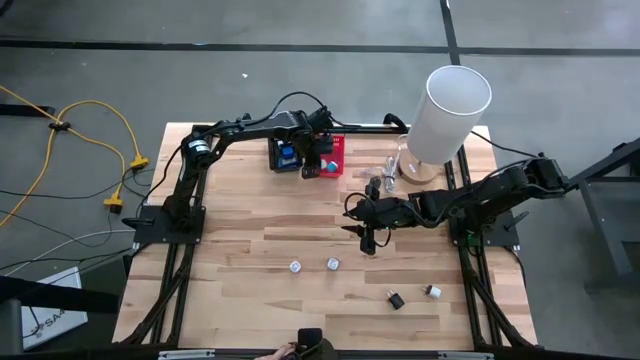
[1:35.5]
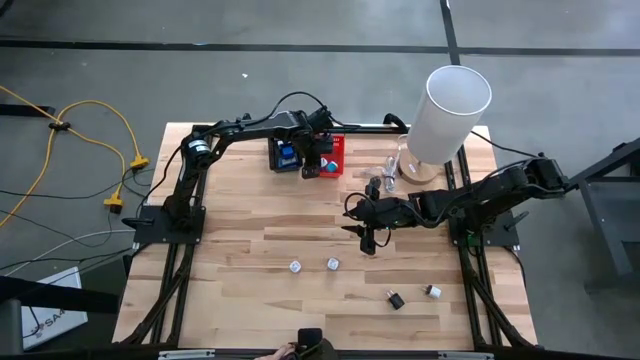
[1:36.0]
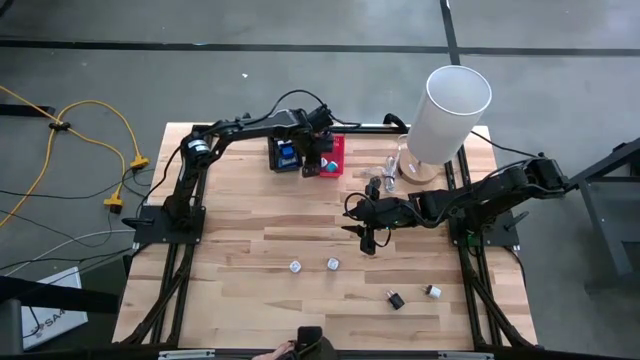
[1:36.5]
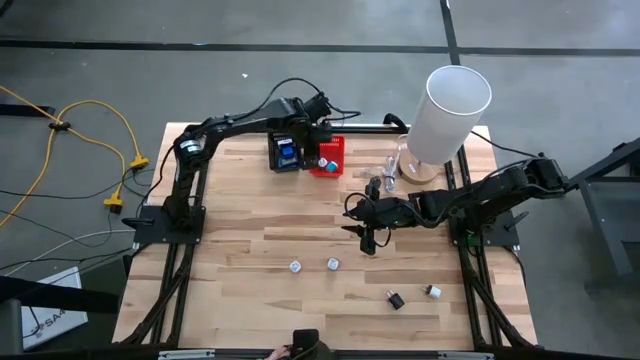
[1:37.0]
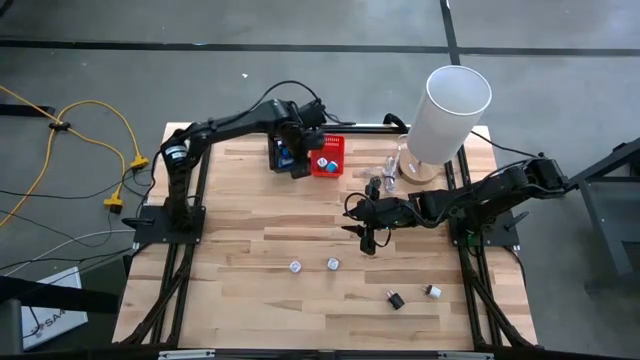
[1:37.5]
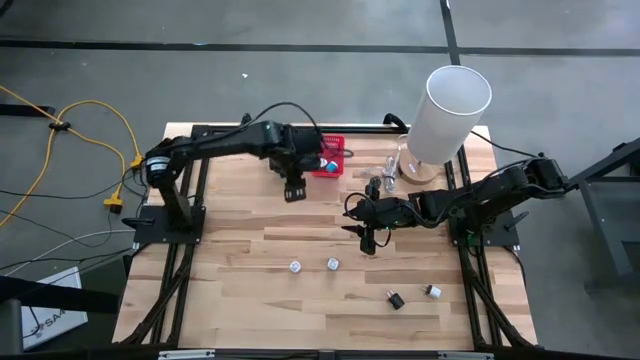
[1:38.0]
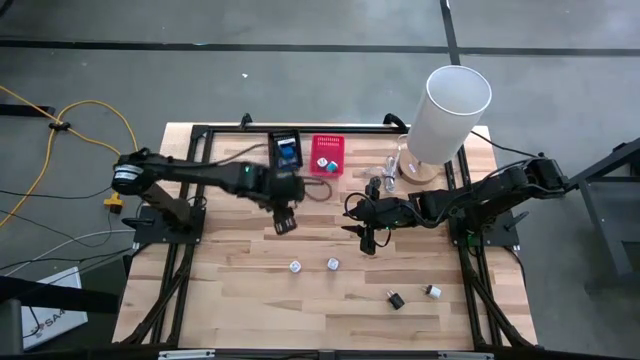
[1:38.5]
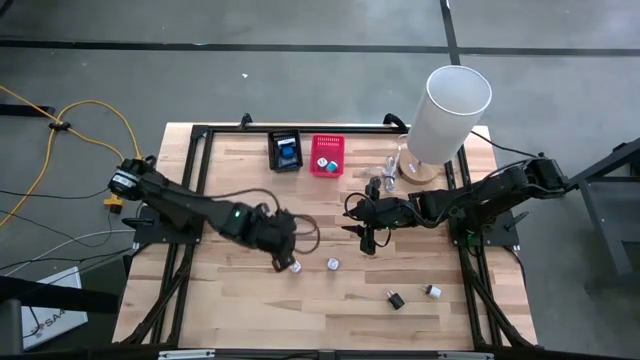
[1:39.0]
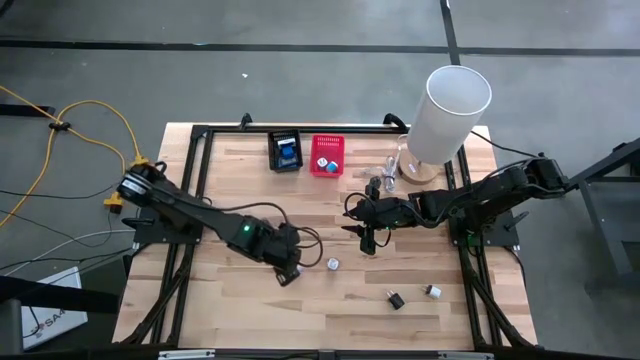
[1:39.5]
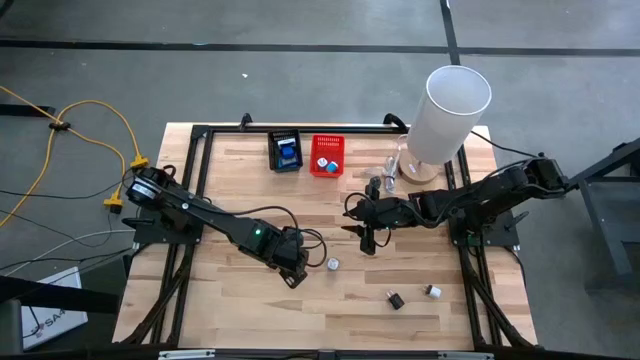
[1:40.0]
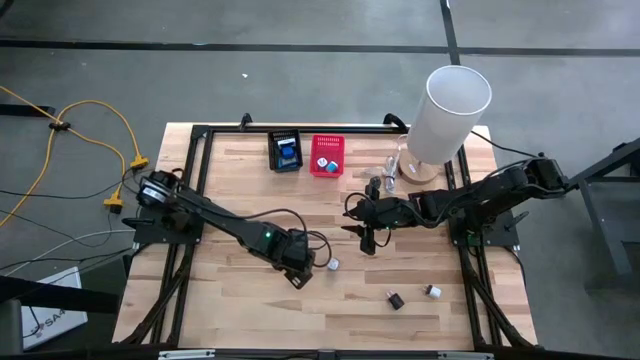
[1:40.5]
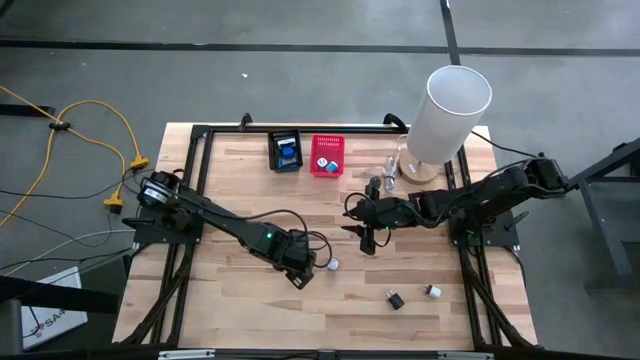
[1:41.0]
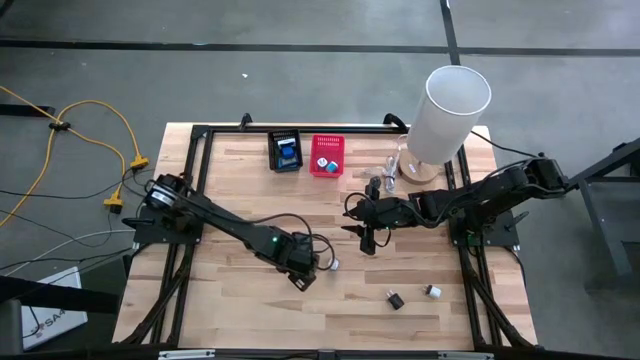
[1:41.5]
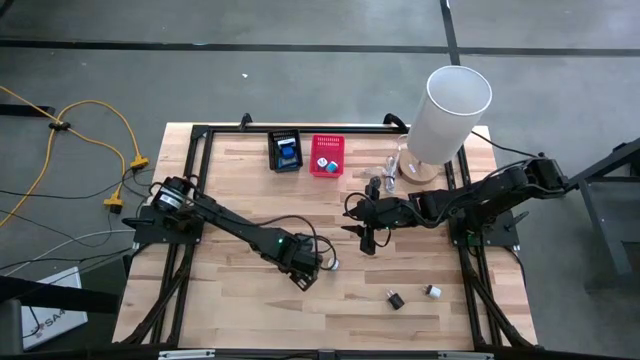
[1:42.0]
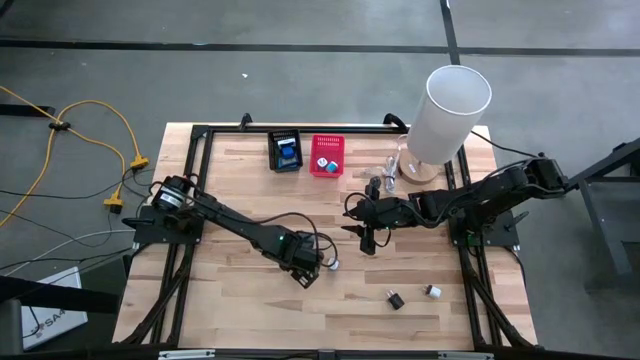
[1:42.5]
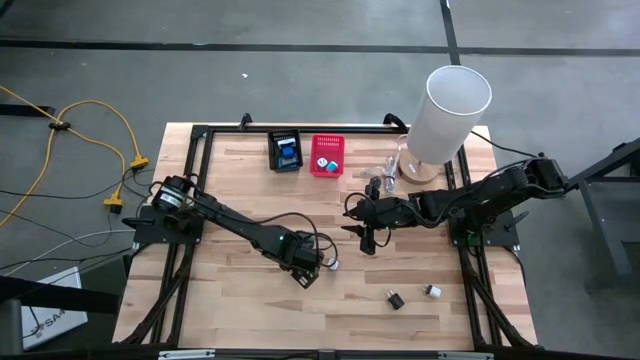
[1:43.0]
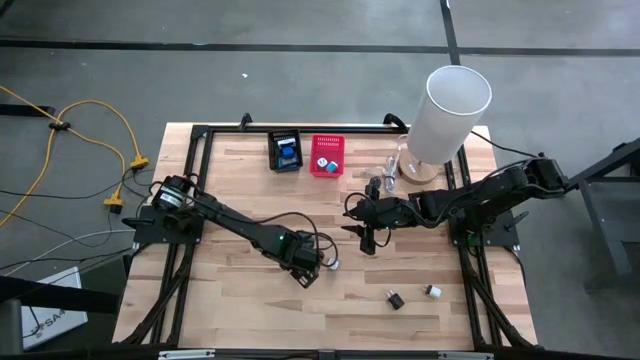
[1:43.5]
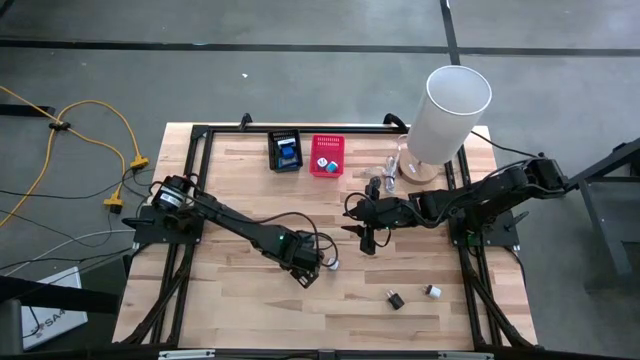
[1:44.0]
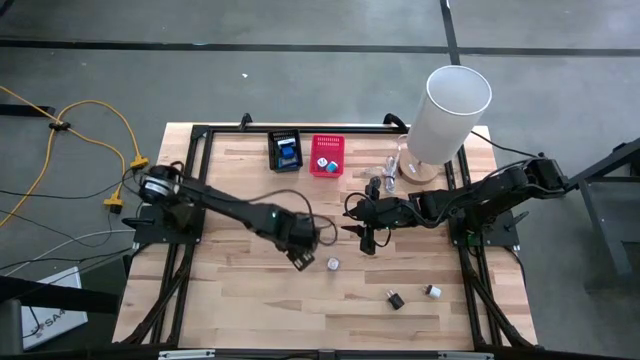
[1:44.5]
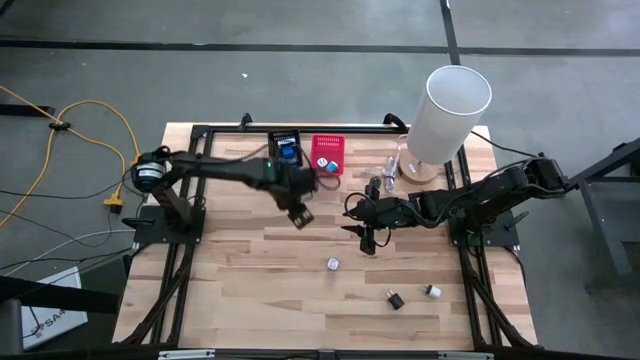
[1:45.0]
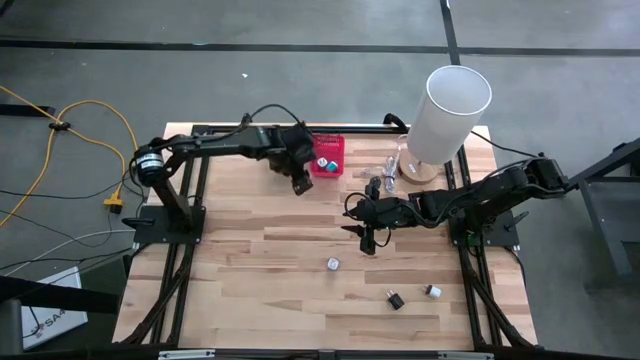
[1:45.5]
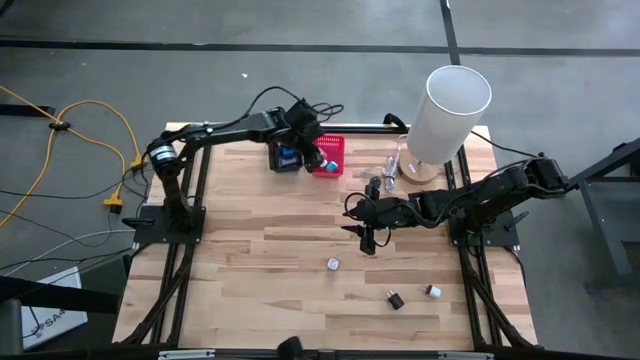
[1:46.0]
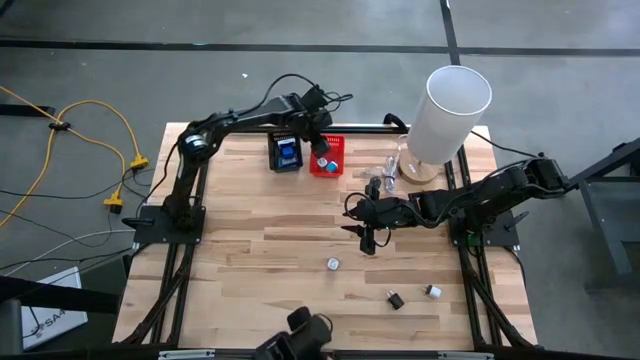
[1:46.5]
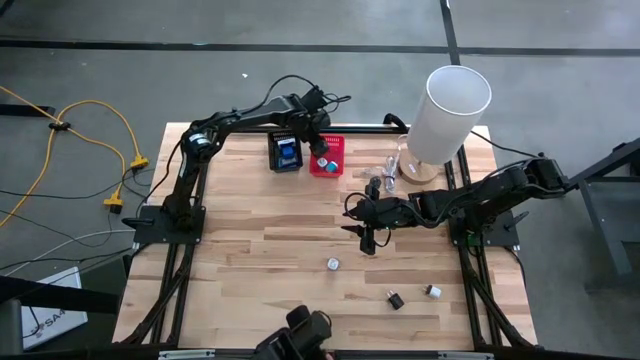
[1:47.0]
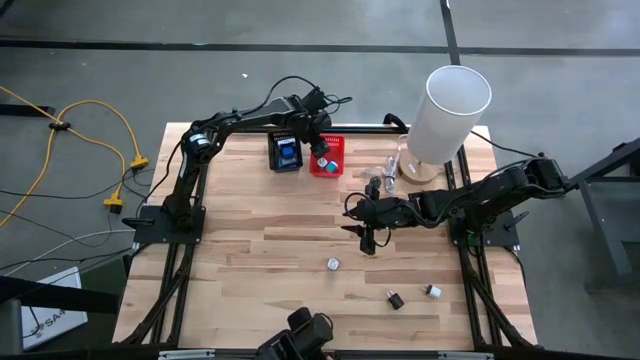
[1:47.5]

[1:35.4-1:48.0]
Task: Pick & Place Office items
Put the pink charger adapter into the red basket
